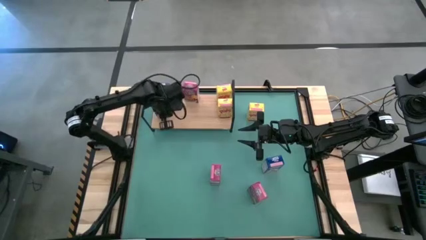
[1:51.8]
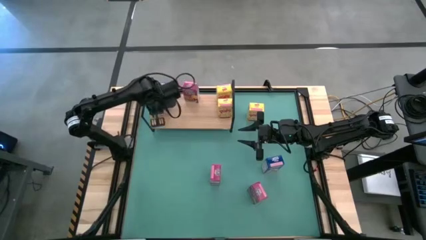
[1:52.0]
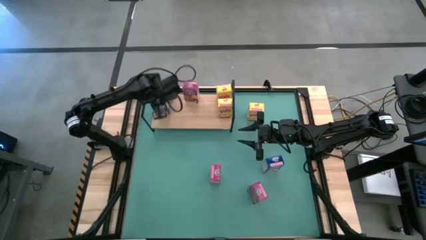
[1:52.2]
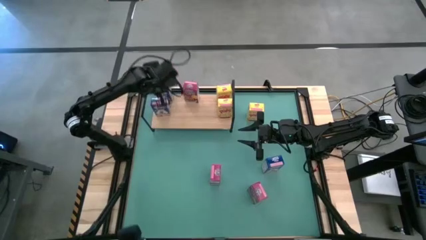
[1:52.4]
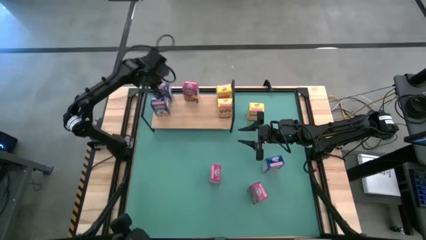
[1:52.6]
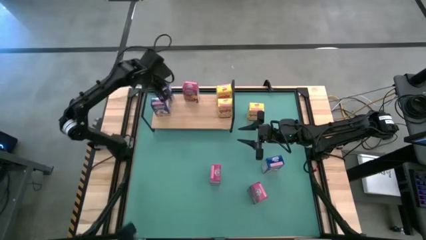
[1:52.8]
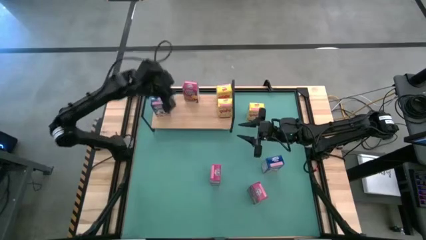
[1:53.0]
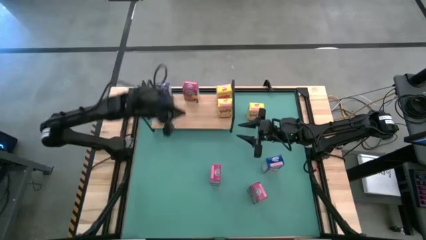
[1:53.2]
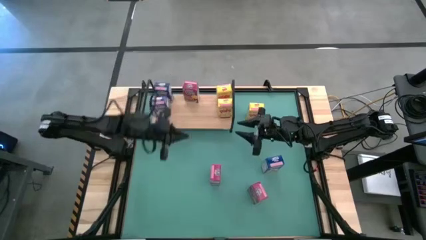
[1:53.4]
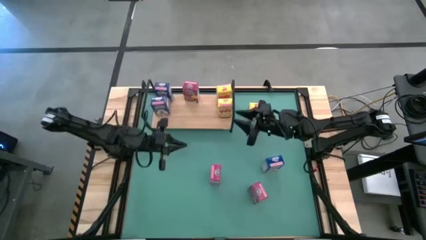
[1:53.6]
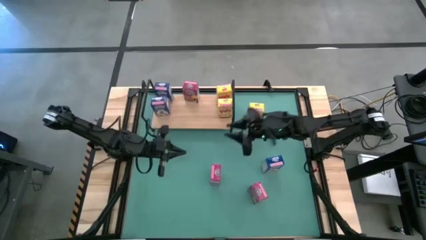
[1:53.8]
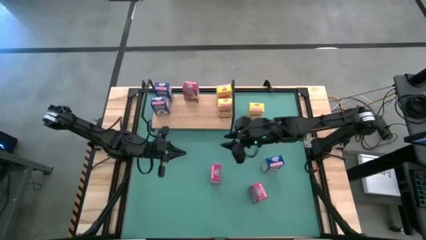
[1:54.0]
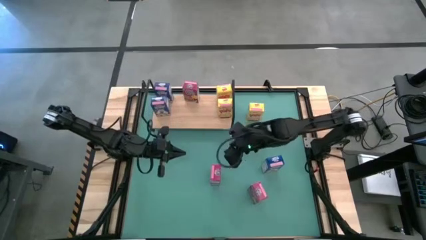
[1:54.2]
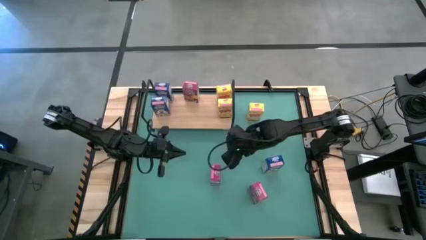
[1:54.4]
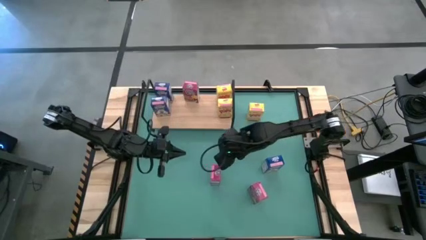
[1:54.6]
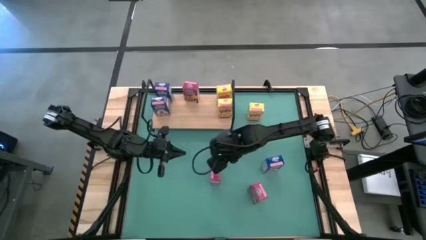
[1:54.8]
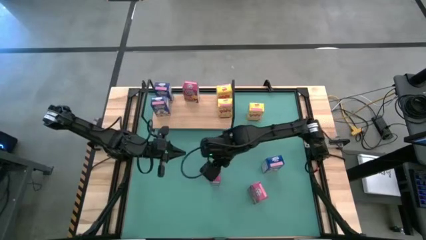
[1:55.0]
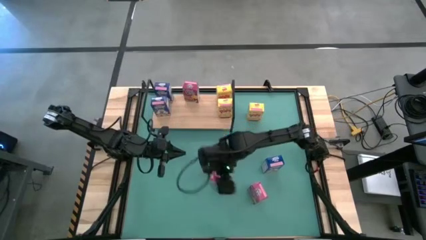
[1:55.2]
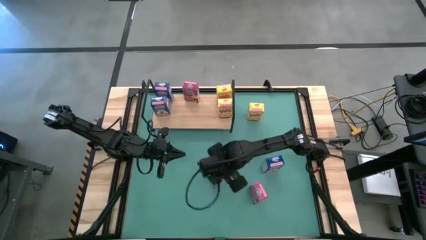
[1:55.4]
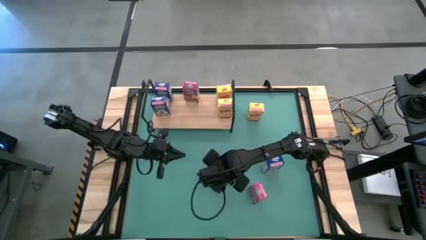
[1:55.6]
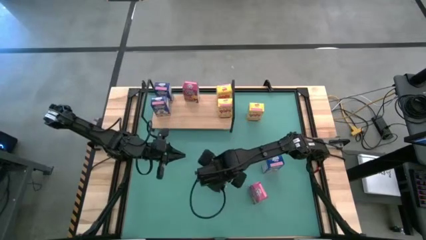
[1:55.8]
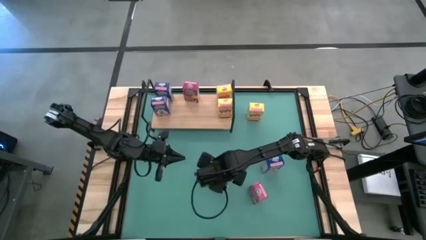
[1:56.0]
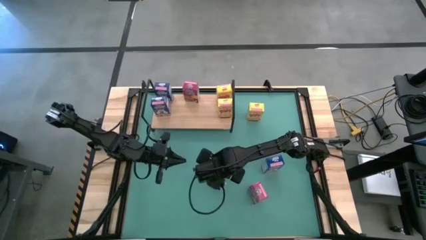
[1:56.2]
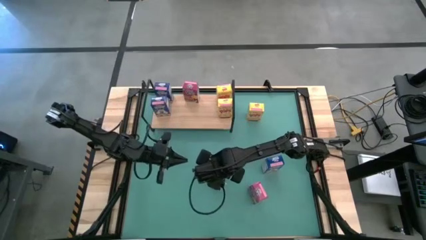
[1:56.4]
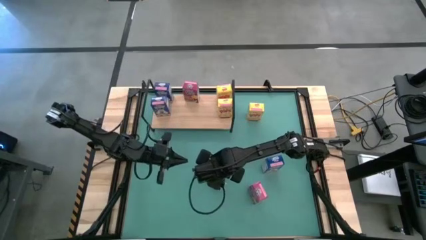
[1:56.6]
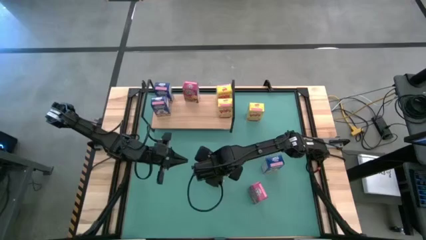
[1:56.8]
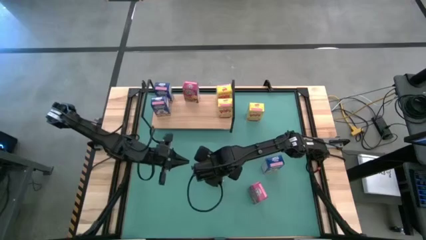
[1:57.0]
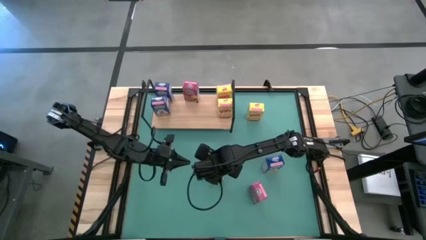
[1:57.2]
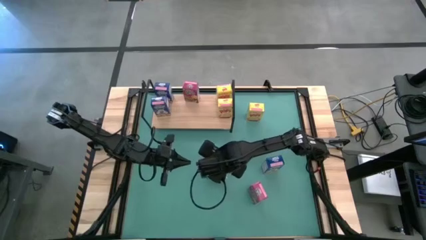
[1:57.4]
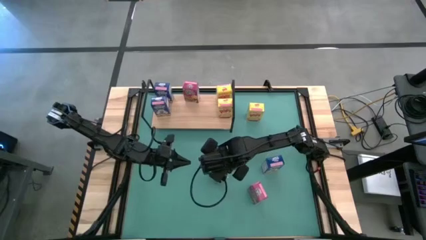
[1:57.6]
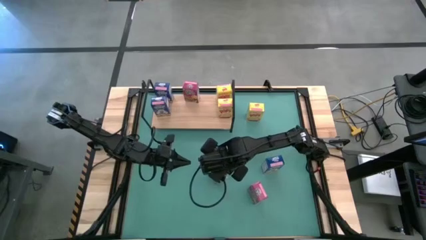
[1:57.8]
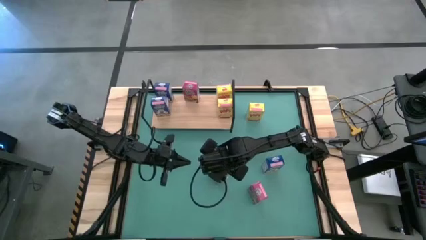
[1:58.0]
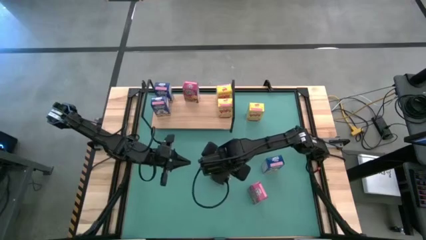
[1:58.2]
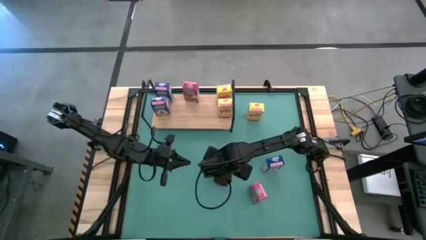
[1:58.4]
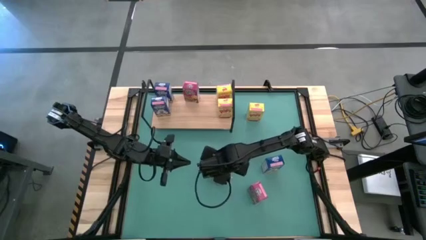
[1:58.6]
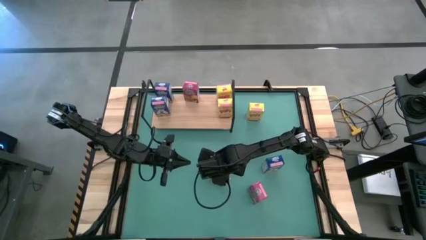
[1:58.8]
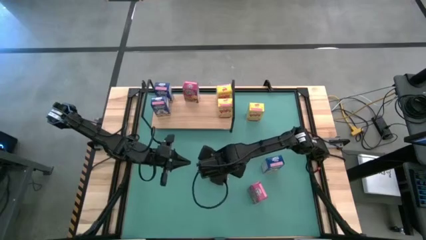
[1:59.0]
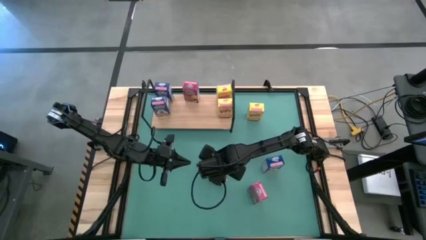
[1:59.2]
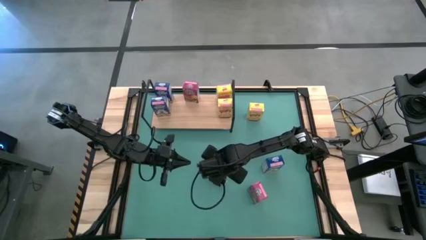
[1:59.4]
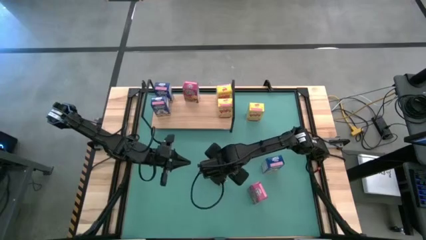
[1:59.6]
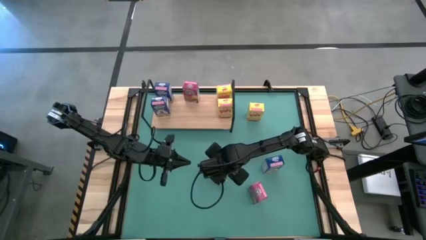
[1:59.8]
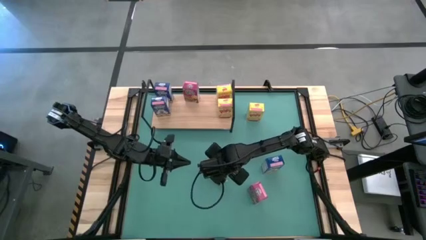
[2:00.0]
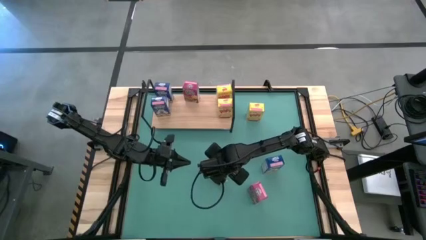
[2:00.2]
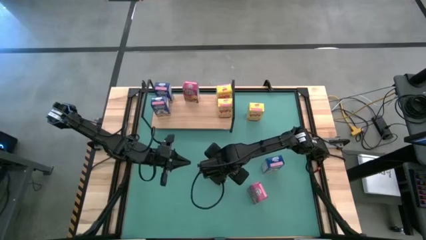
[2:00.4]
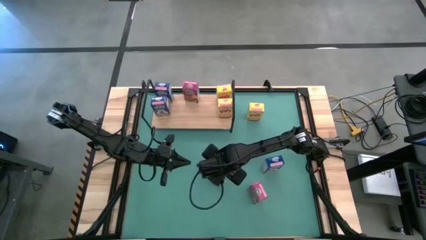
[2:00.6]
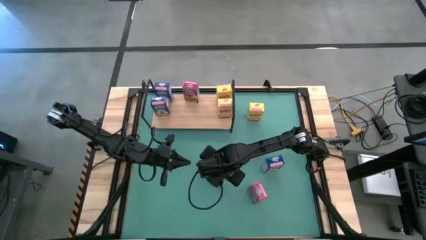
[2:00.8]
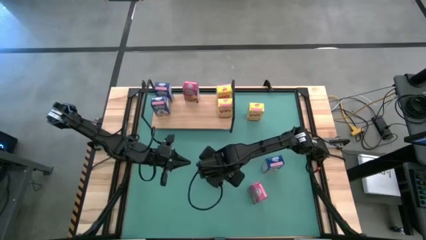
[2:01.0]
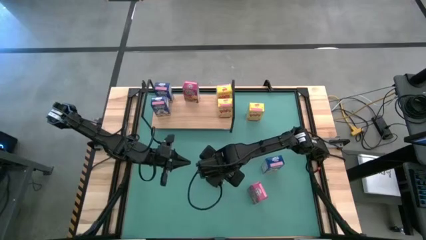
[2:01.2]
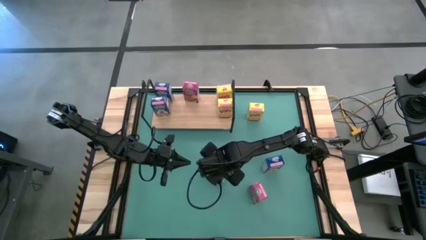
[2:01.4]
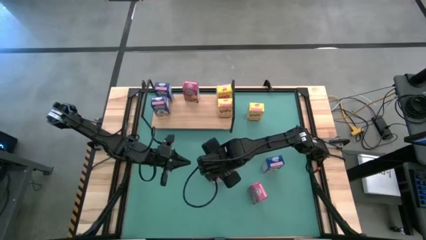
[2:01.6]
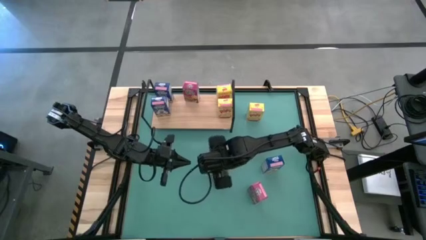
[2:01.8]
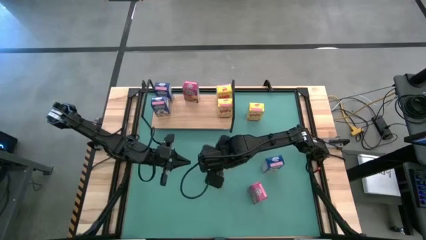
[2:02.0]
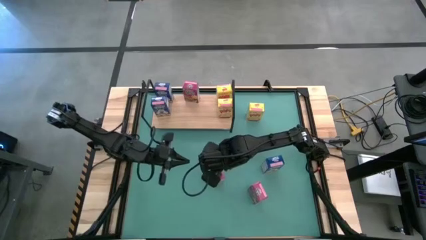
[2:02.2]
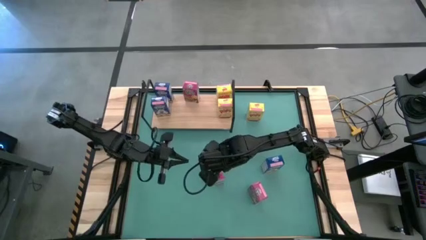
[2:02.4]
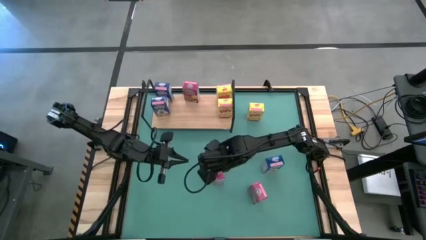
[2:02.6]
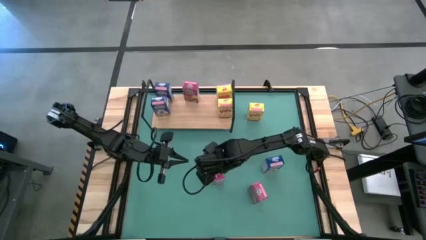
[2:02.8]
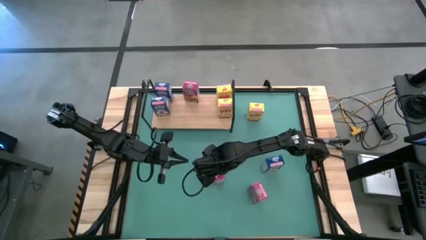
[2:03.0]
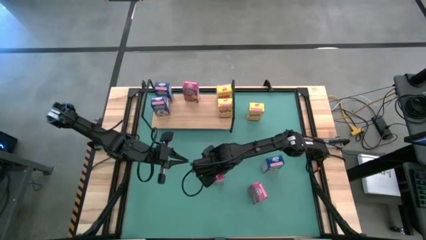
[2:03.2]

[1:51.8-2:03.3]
Task: Stack cereal on shelf
Put the left pink cereal box on the shelf

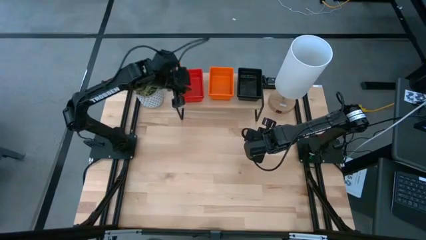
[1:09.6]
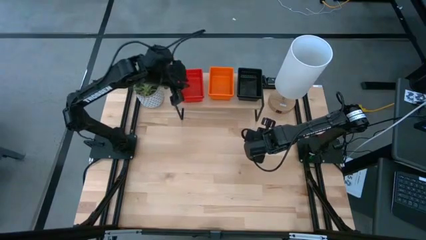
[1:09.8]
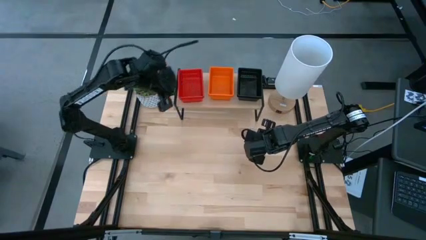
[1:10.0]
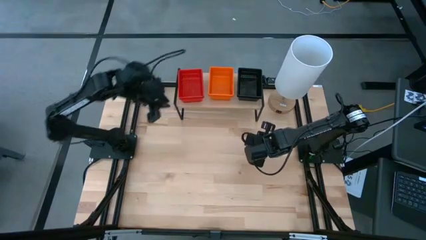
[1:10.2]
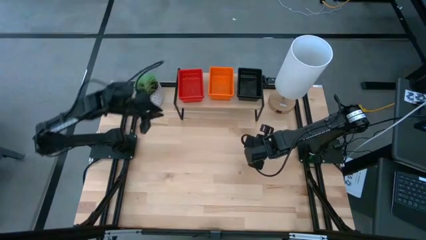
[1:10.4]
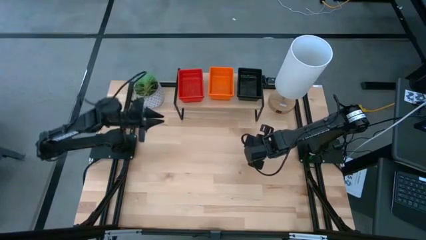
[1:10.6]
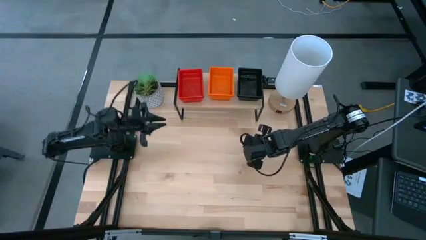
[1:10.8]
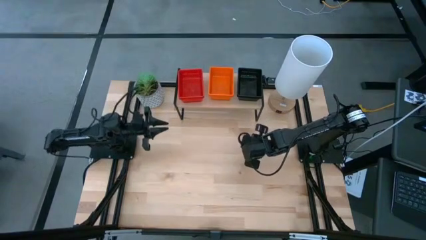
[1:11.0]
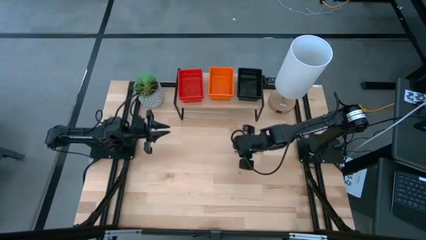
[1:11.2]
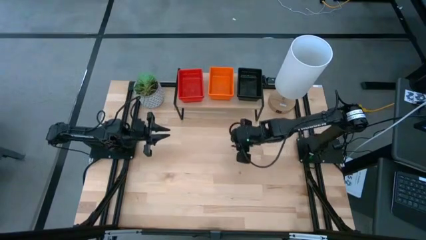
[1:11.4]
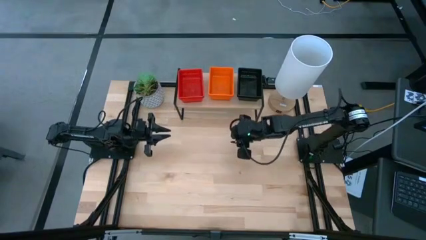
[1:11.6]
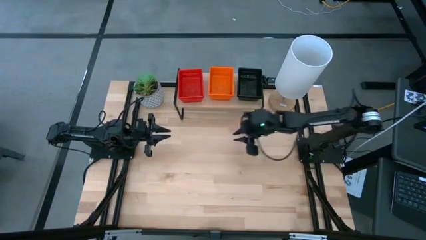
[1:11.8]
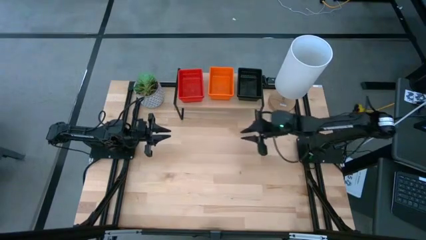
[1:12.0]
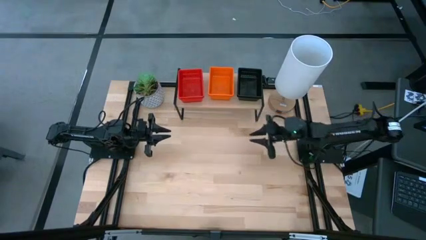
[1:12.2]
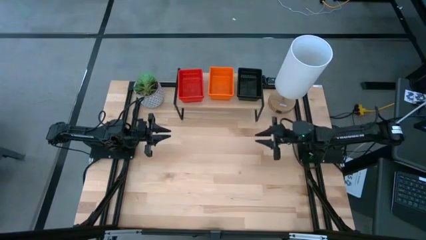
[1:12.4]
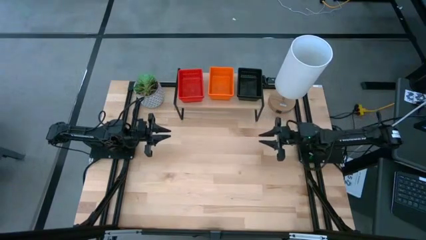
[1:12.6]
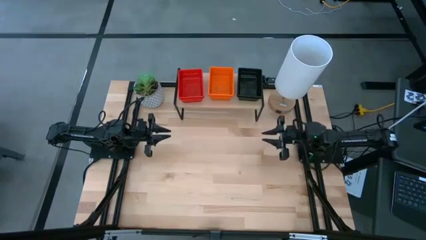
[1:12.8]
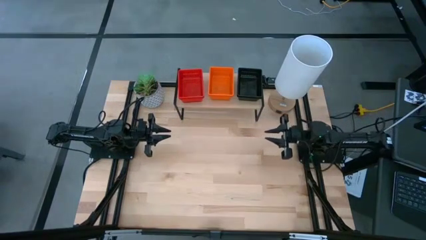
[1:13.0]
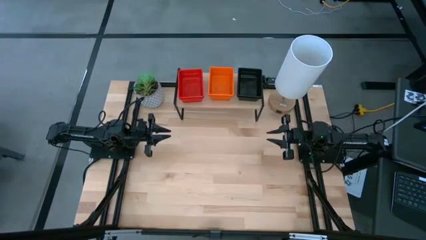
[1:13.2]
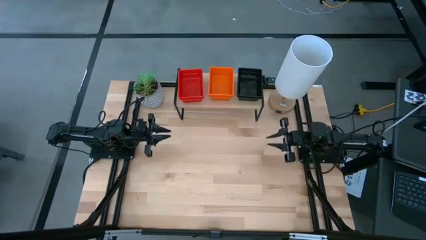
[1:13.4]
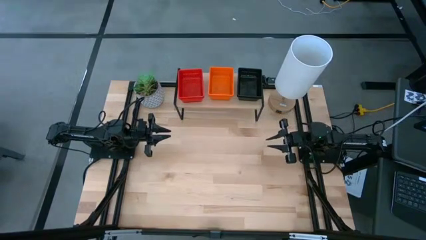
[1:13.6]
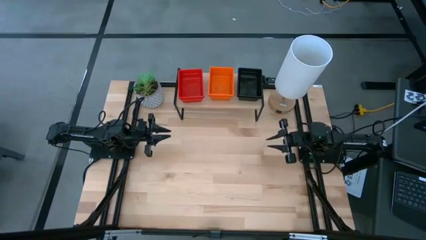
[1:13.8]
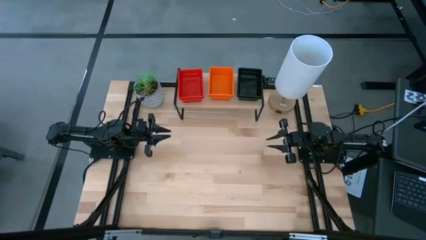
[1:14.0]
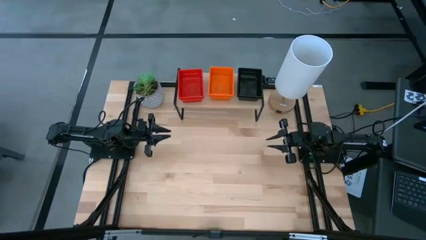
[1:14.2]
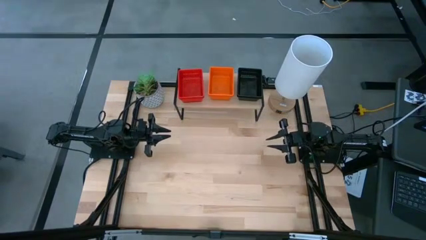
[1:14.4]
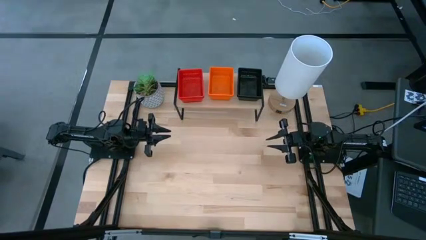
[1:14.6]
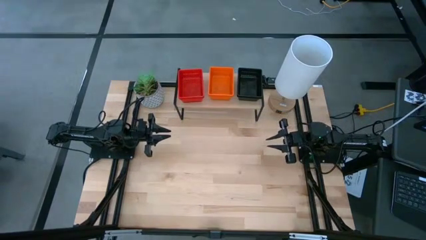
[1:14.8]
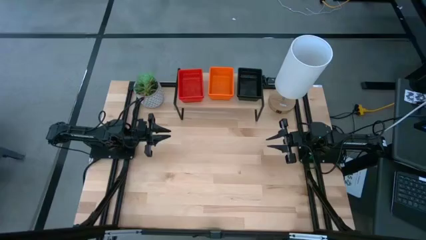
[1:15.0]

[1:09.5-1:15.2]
Task: Stack baskets on shelf by color
Return to Home Position
